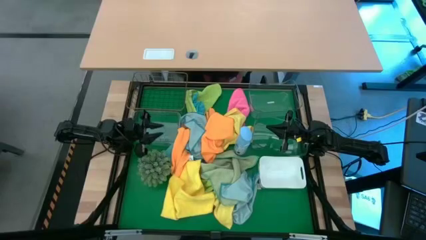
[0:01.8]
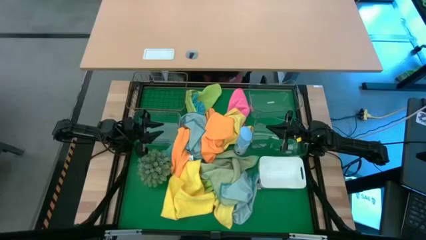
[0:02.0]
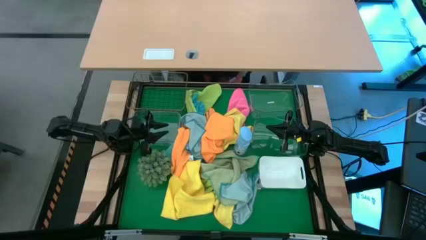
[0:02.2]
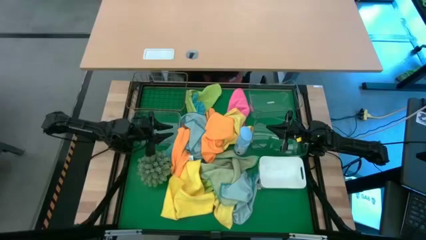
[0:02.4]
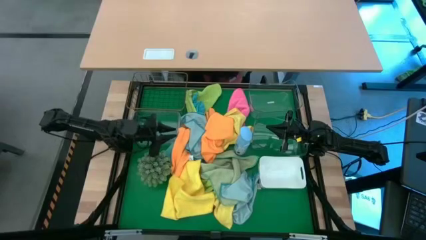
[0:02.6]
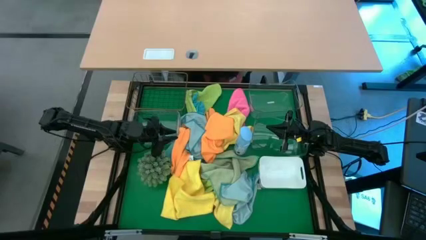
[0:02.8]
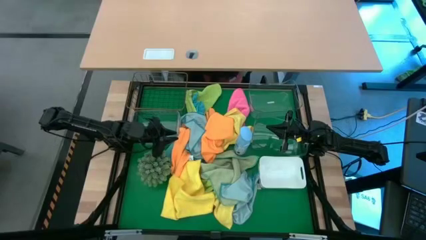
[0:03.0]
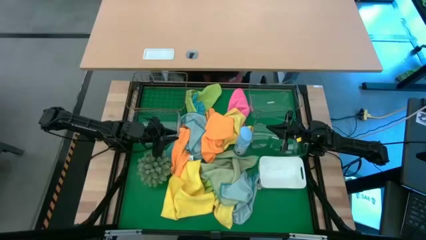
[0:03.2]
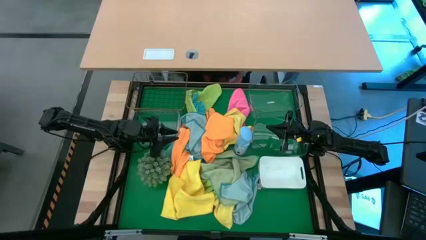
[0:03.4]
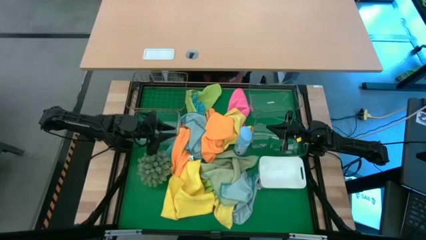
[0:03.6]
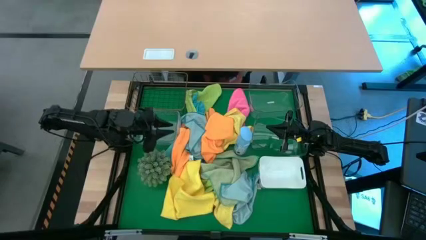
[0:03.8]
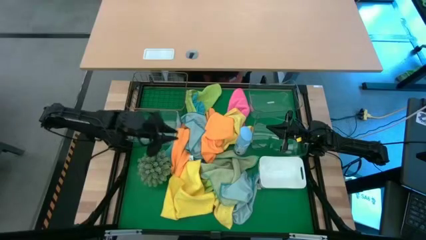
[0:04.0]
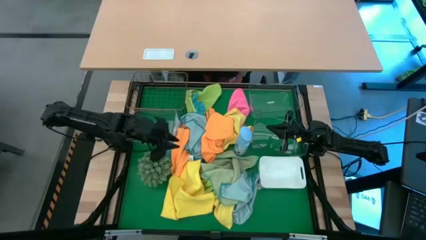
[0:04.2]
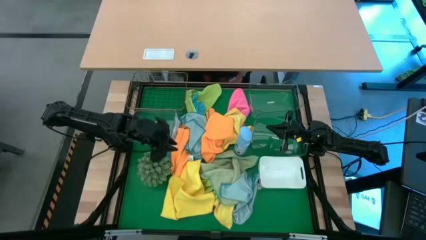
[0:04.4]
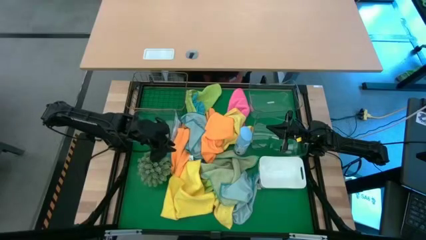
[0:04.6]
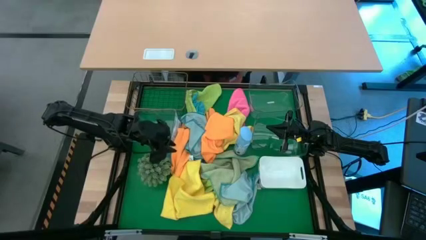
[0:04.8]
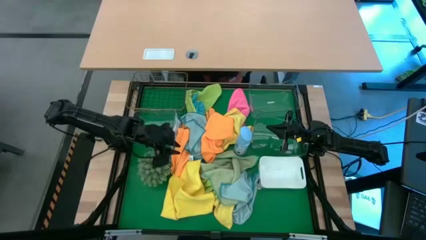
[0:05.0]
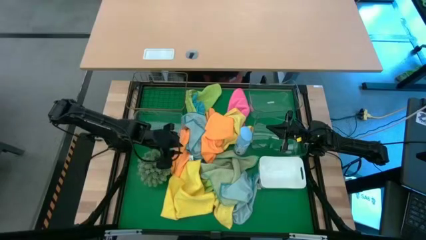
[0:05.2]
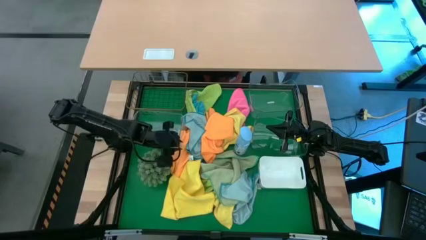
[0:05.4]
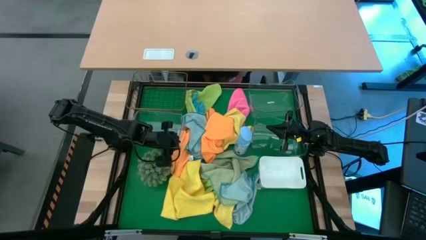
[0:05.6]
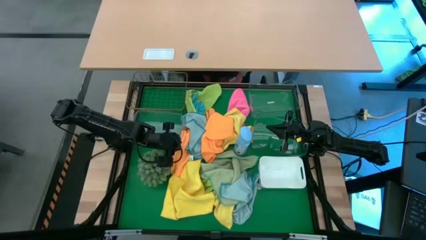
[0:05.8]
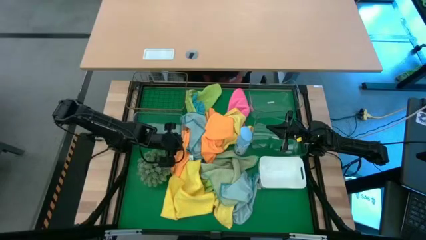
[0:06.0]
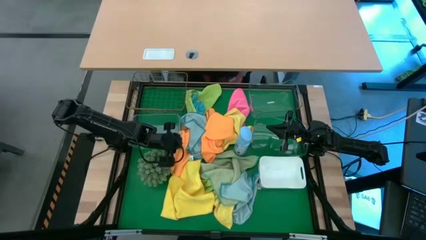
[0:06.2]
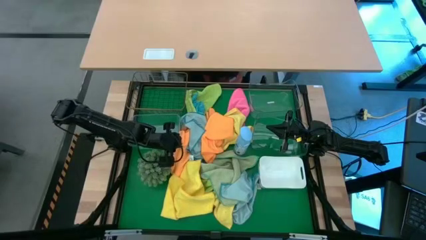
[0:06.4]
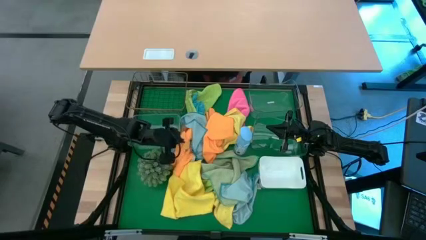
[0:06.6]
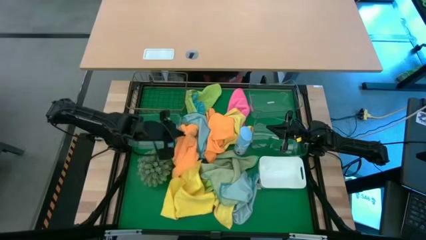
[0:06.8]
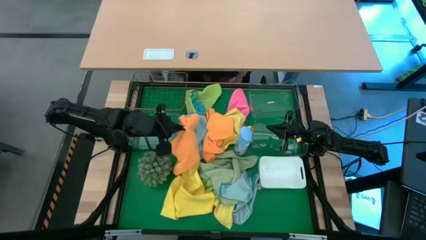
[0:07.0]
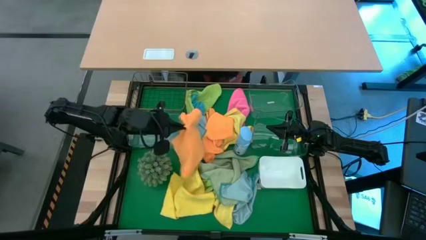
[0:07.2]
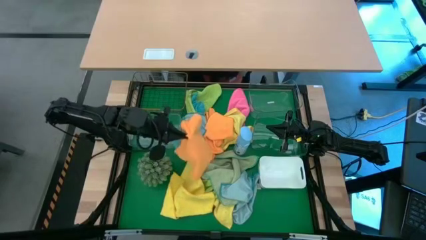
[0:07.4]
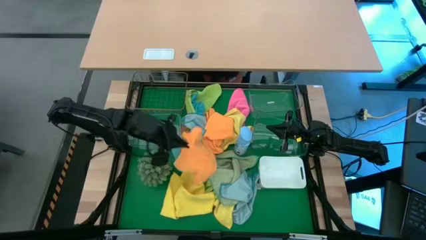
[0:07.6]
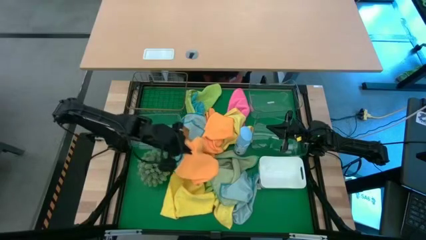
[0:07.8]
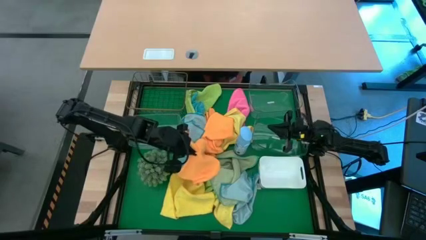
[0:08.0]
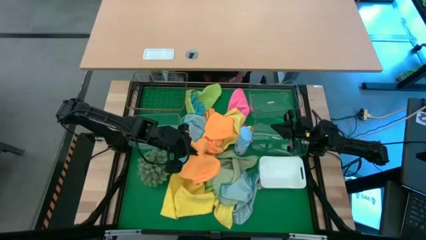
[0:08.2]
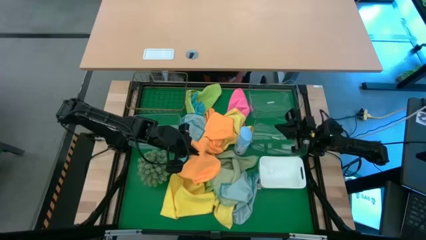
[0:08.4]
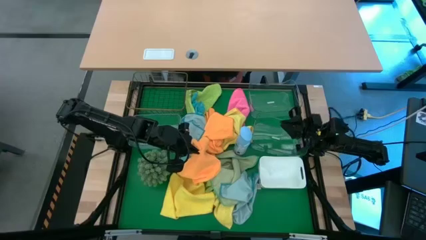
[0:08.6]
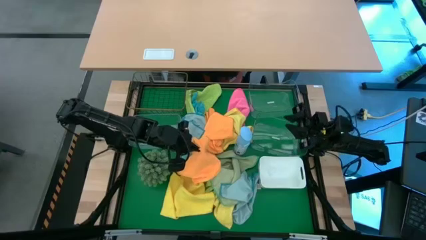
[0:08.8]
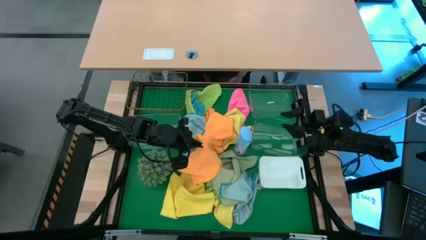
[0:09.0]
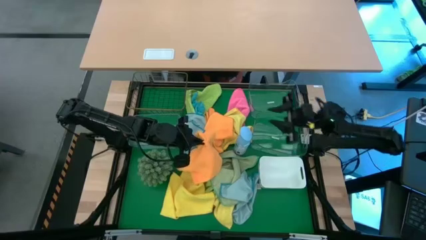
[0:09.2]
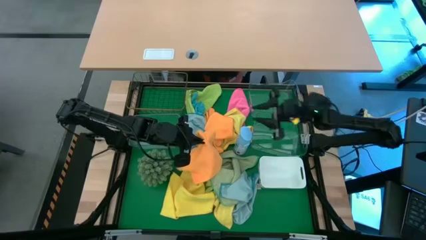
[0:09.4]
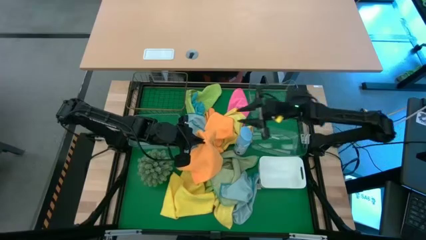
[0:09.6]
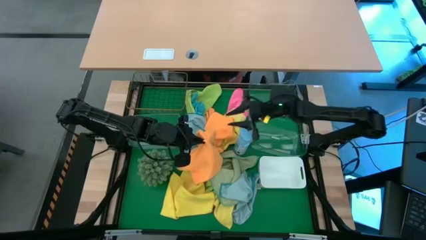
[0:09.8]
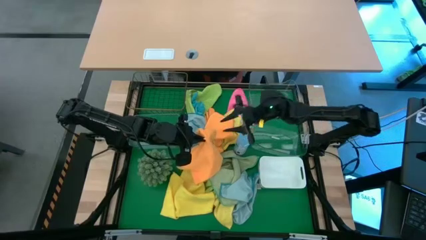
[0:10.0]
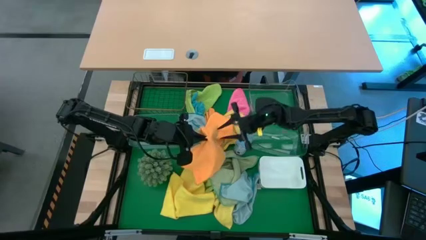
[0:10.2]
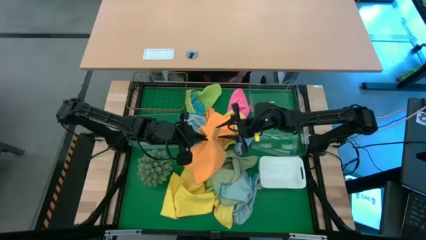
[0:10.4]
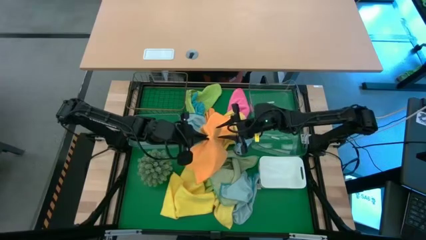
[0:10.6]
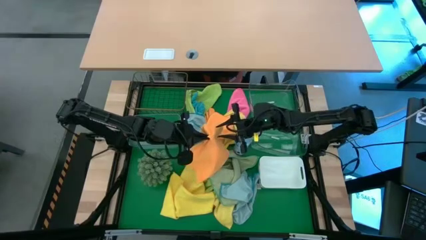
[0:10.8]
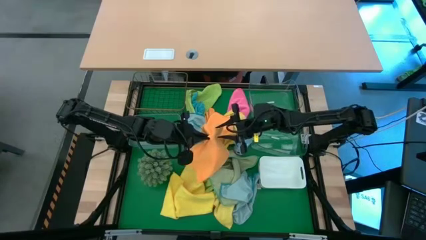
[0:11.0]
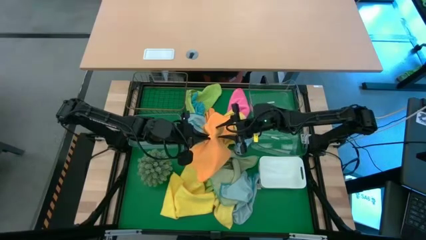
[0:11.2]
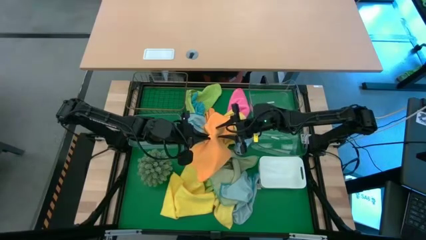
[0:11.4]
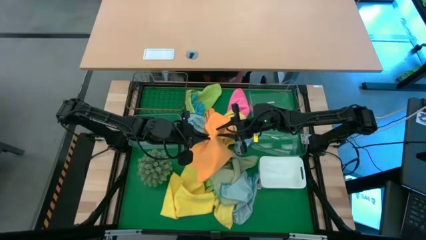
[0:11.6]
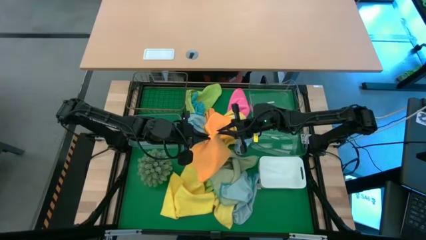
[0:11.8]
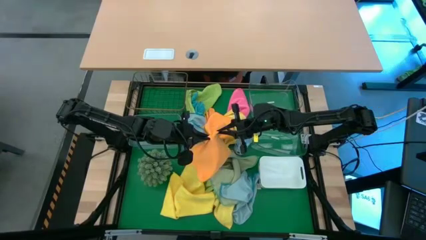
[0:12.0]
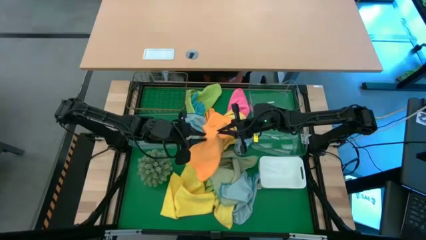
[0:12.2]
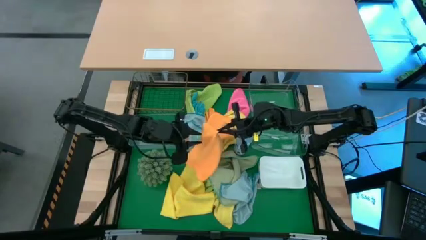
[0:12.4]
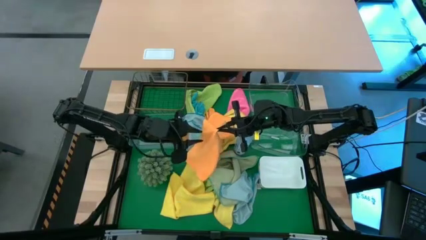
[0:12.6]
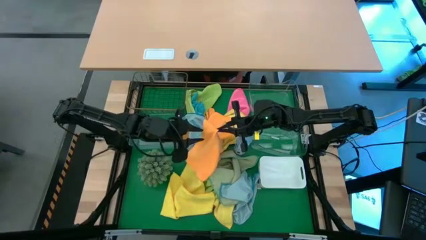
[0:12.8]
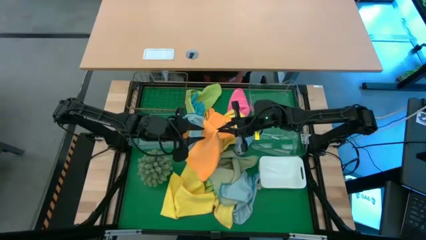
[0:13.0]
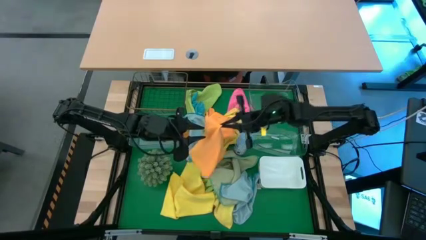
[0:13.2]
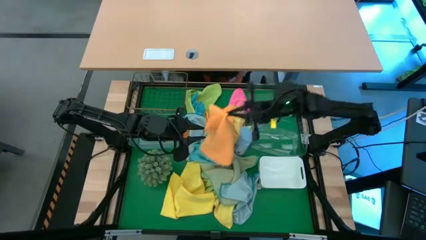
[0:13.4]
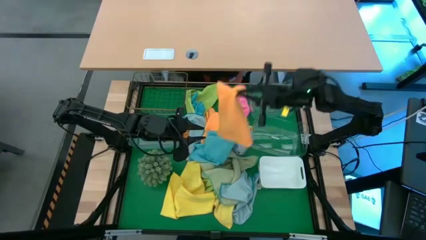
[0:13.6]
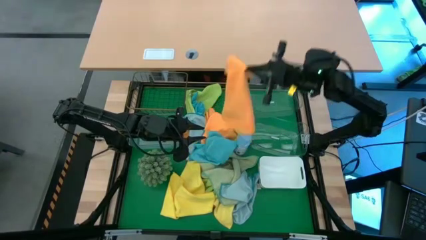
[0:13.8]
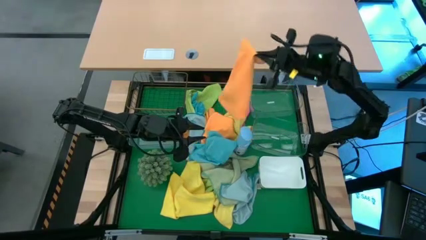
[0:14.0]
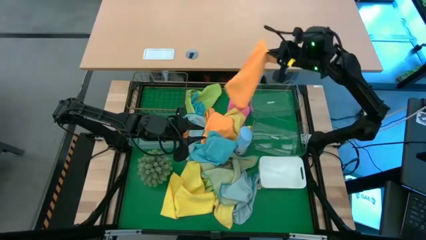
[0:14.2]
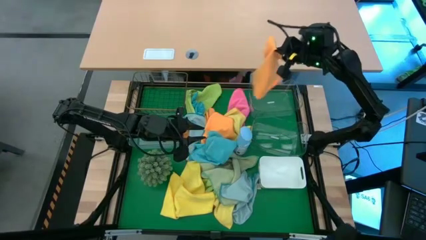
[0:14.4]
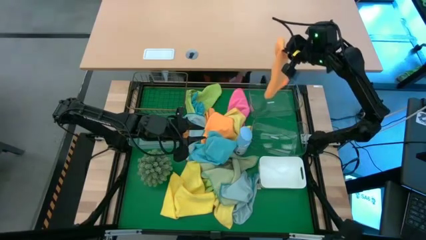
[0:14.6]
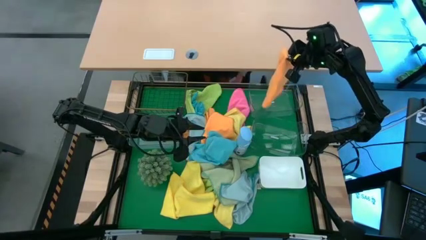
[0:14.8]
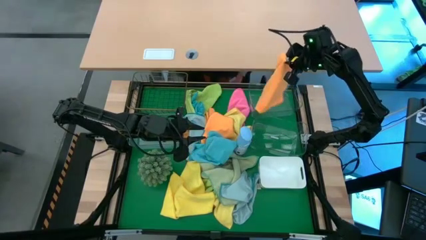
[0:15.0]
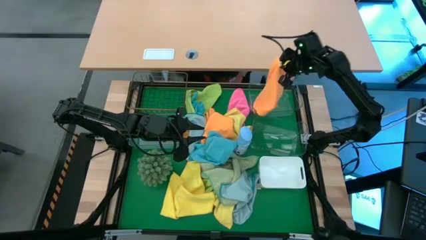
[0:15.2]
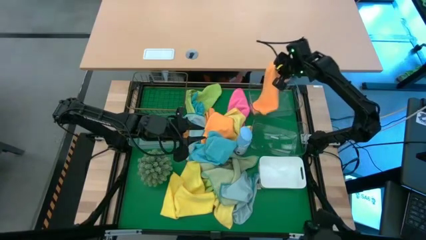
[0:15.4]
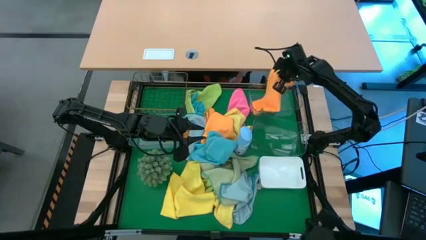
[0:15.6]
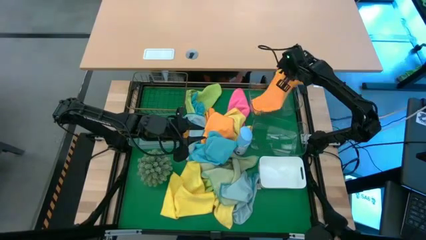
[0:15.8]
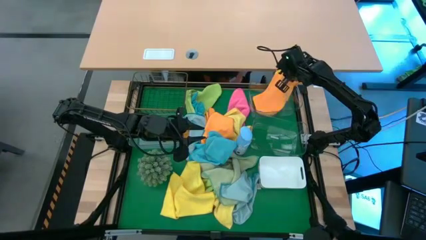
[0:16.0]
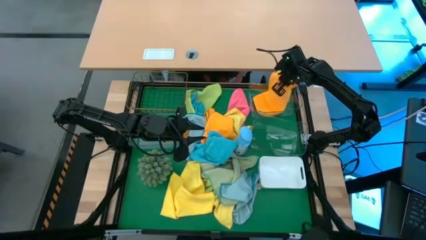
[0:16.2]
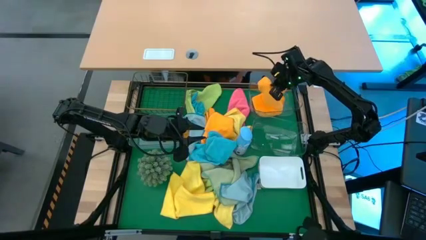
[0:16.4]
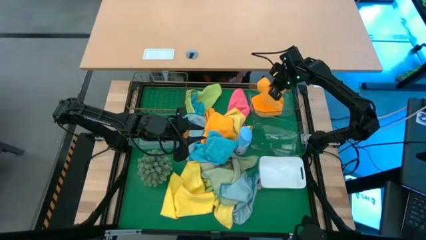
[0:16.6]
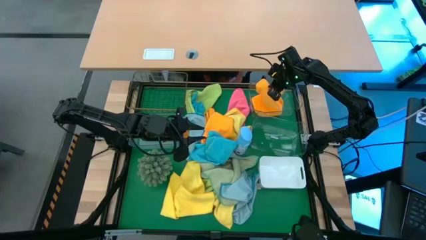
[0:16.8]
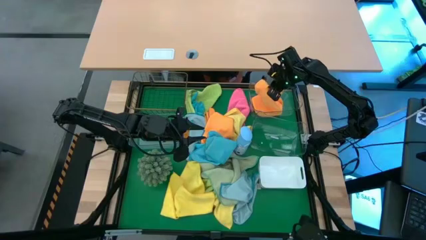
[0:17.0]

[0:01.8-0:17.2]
Task: Sort microfiber towel by color & place in baskets
Put the orange microfiber towel into the top right transparent bin
